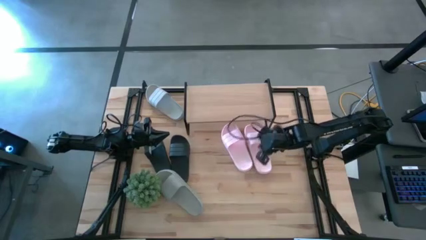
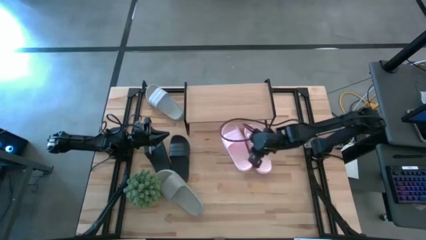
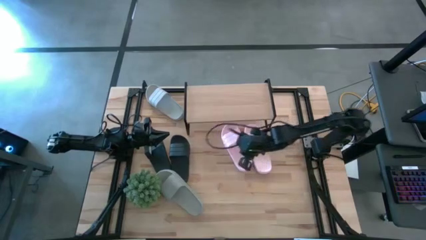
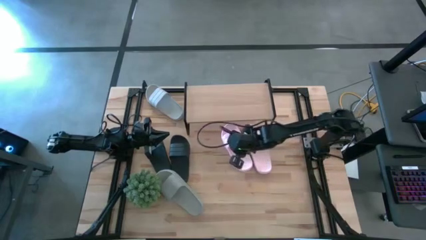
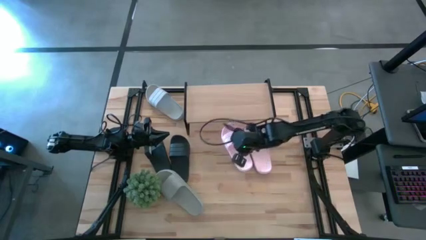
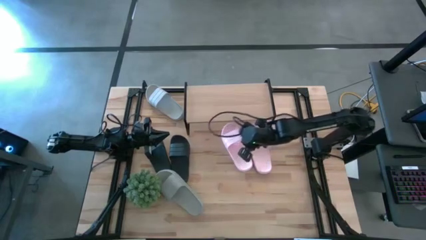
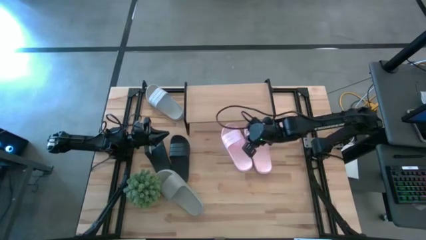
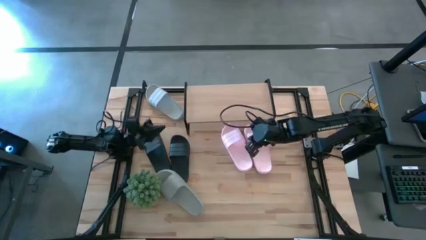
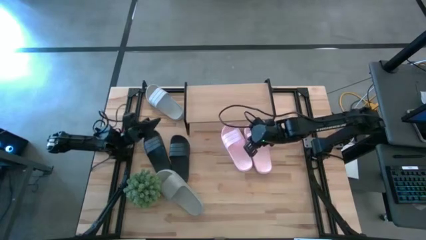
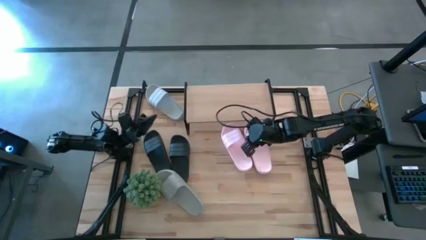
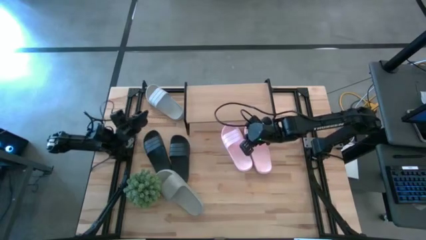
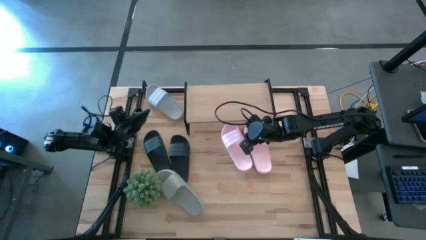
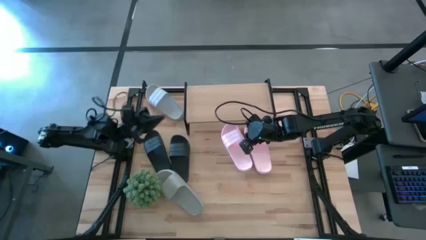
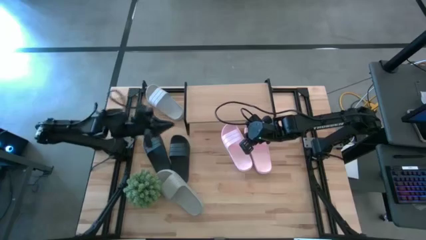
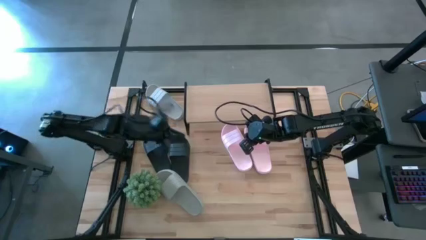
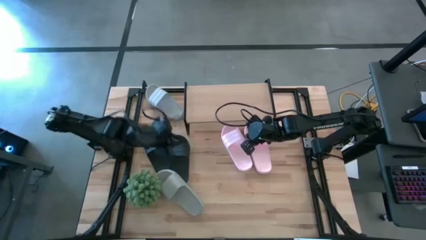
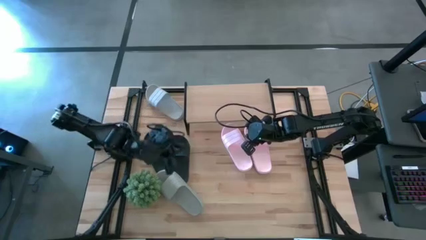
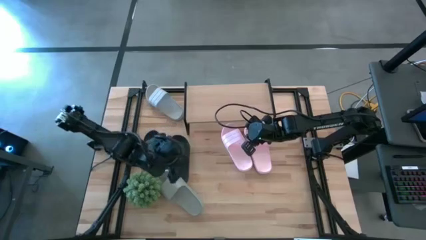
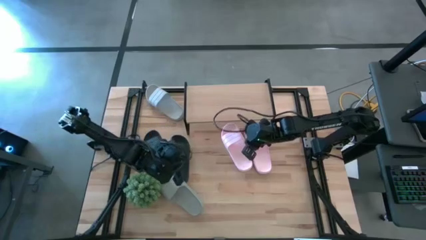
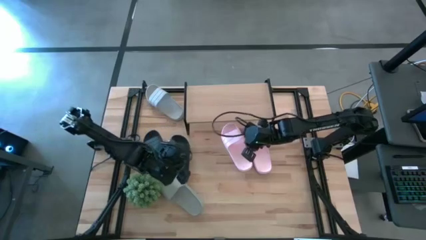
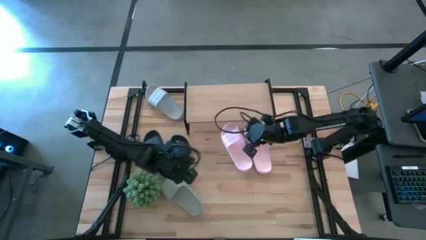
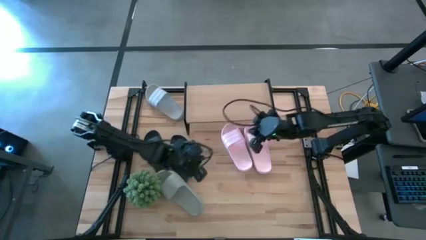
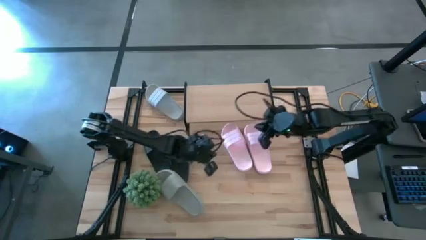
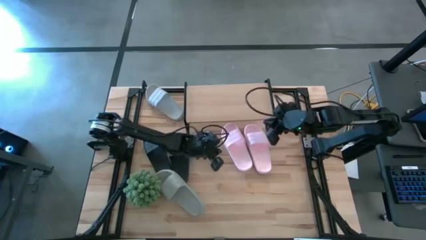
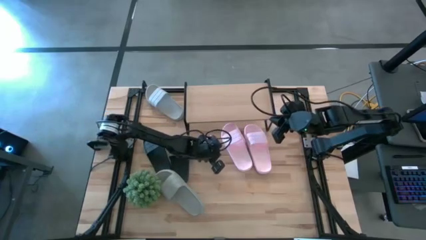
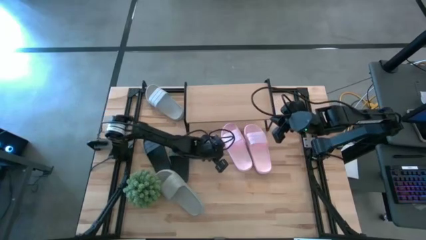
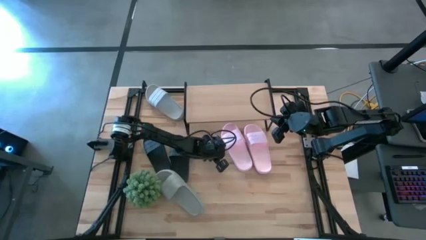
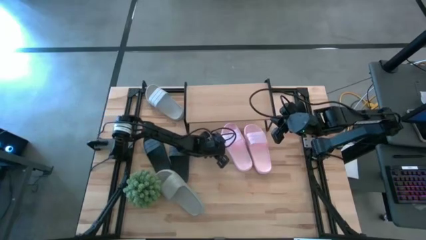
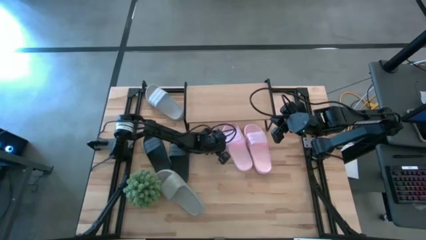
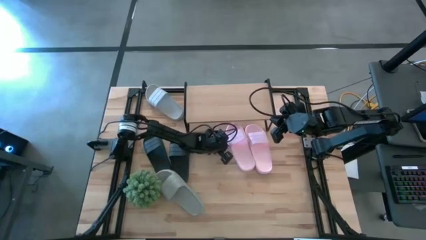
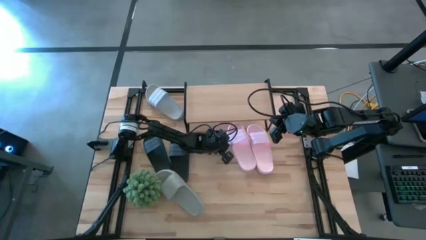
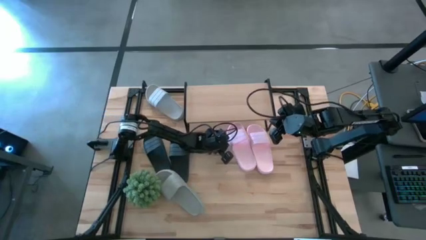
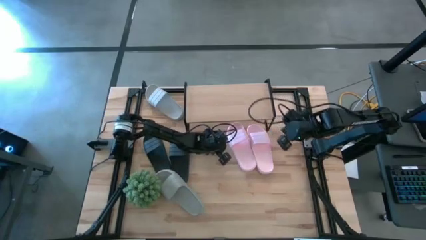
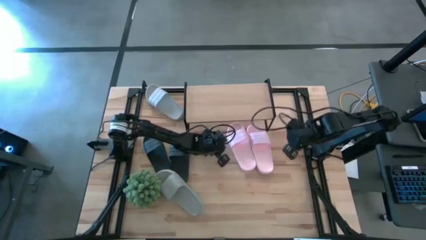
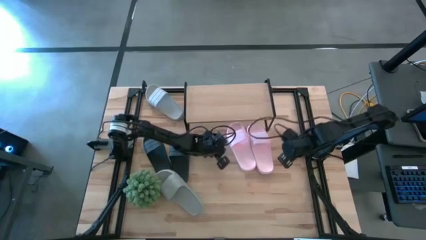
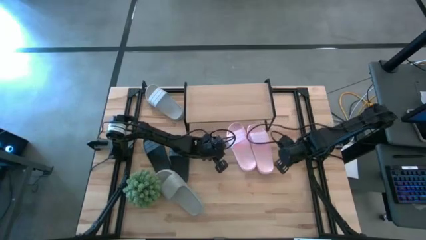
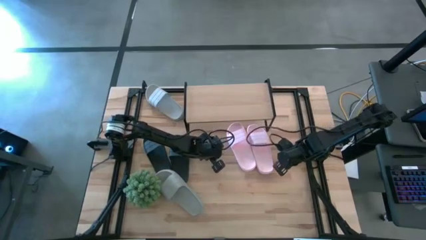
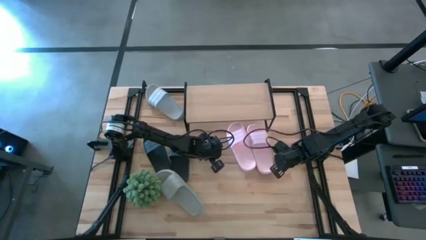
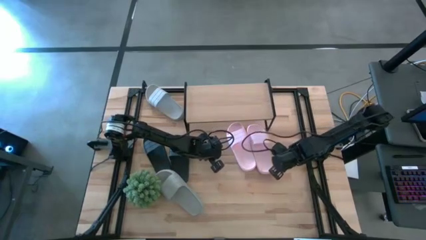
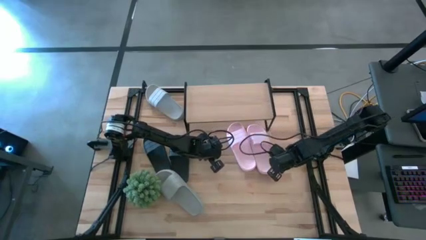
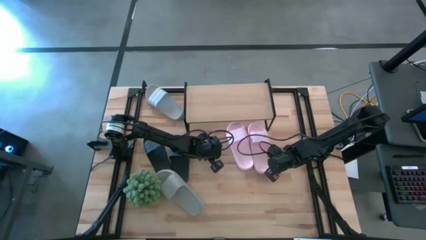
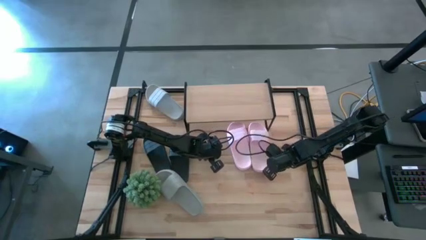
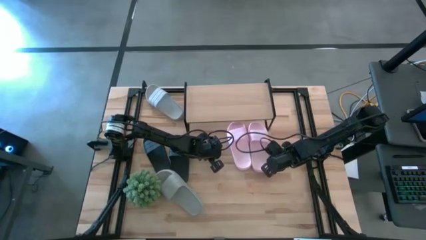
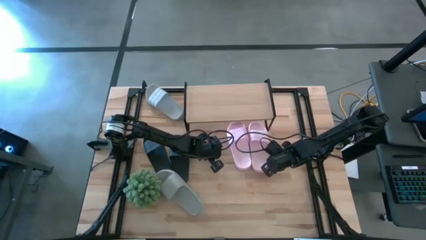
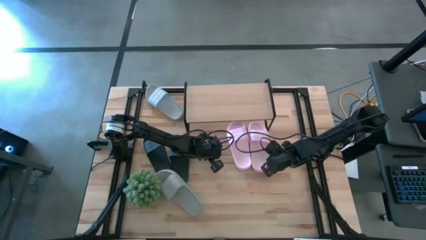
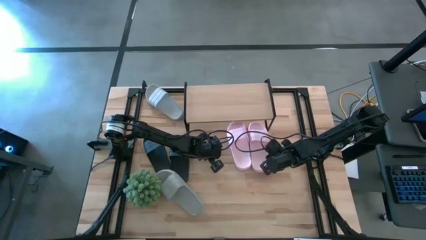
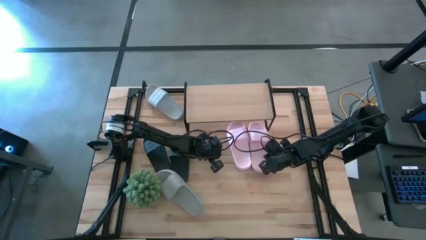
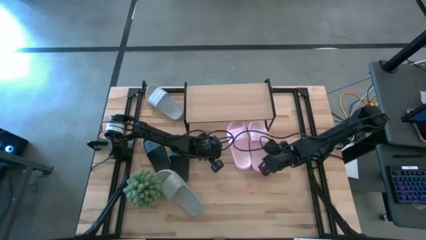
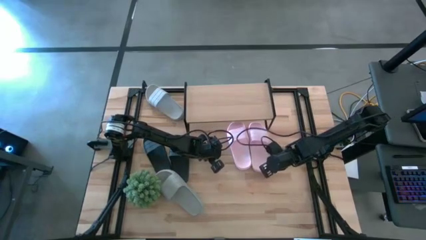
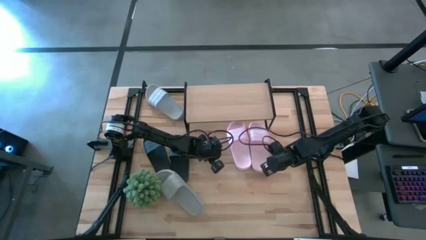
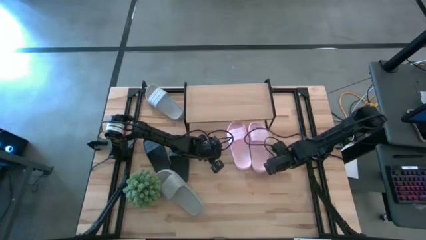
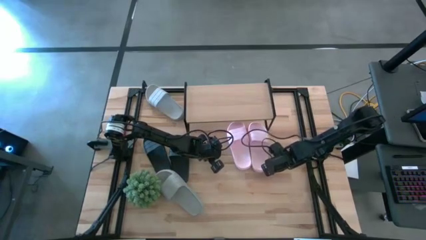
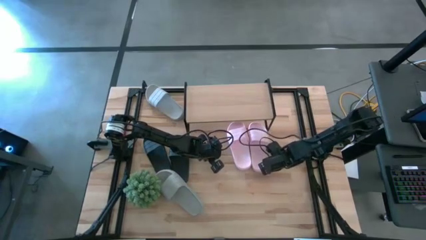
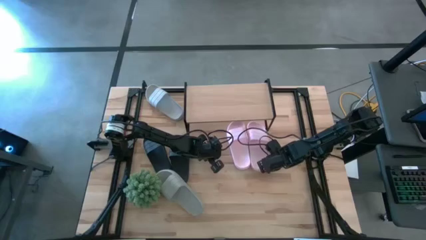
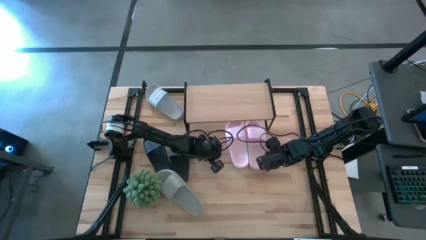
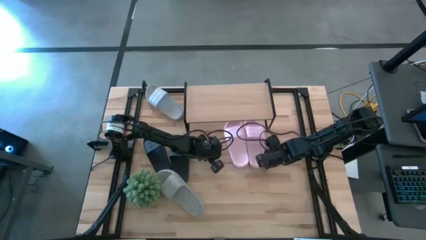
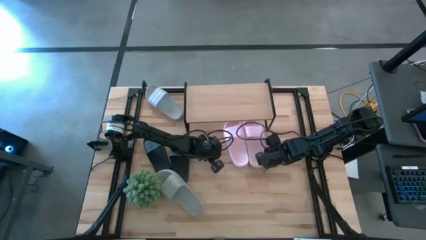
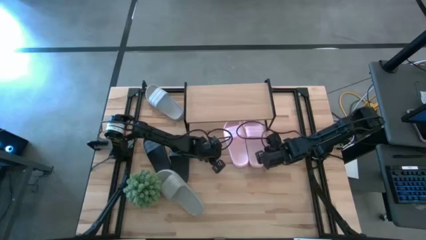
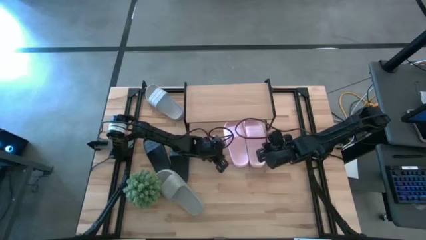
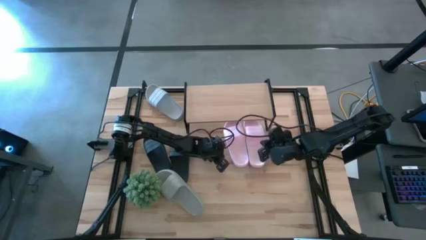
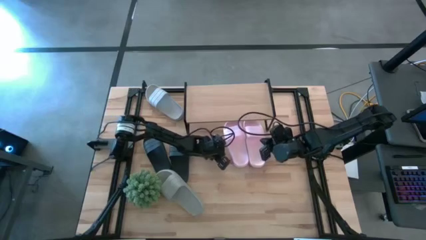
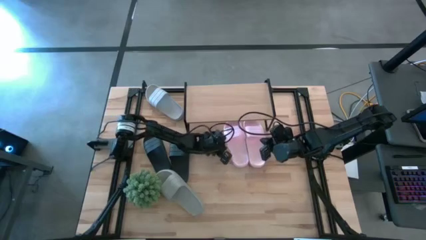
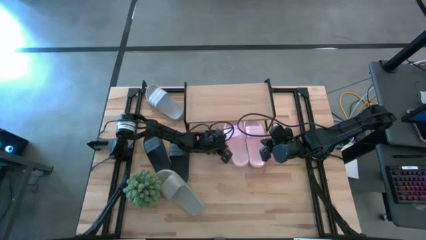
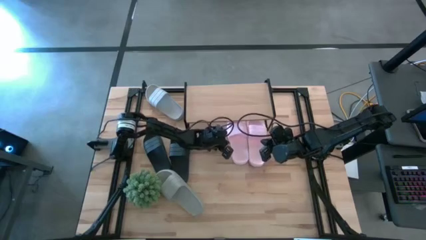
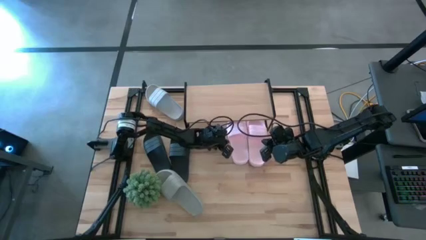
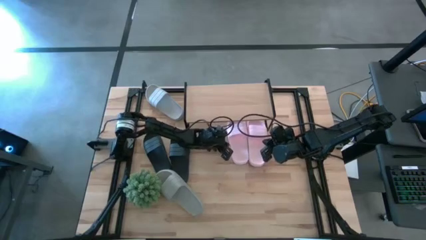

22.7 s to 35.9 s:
Task: Pick and place slides into the shelf
Adjust the pink slides
